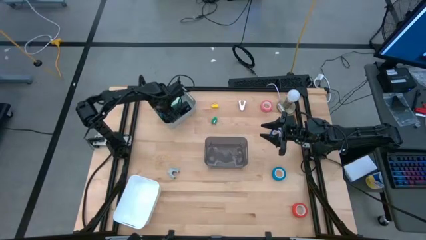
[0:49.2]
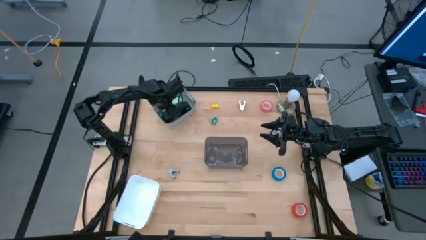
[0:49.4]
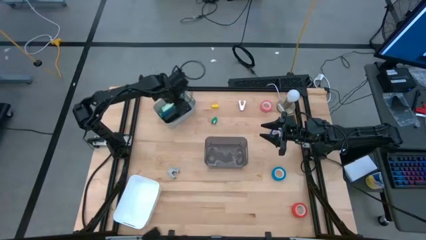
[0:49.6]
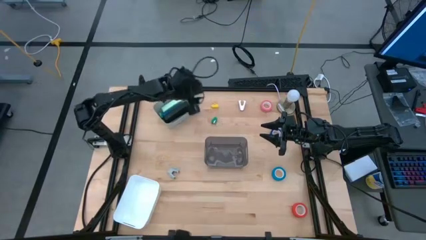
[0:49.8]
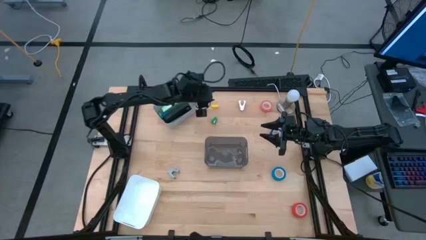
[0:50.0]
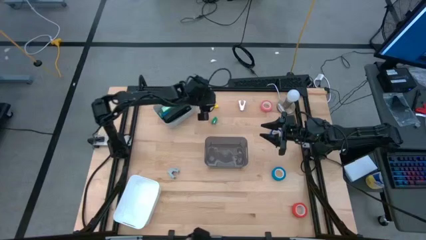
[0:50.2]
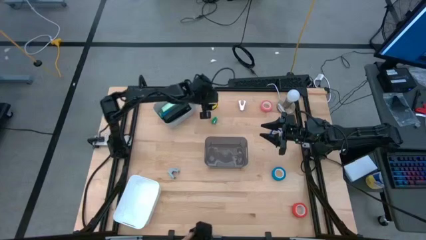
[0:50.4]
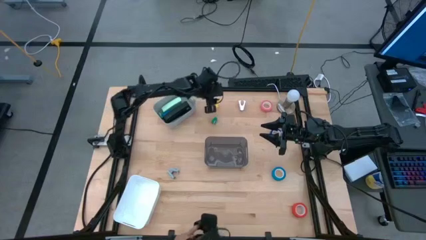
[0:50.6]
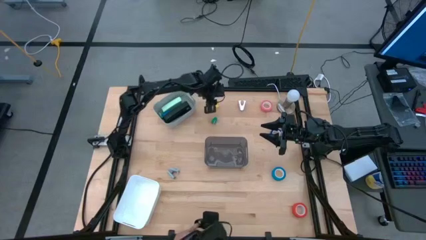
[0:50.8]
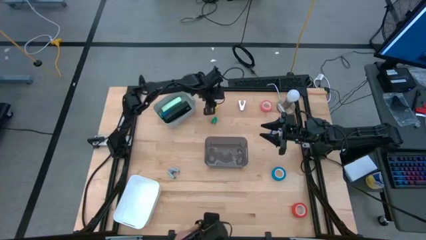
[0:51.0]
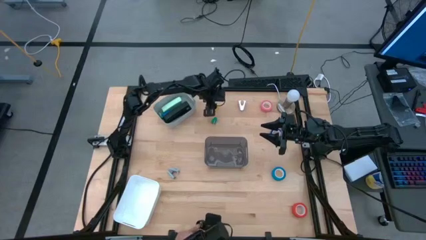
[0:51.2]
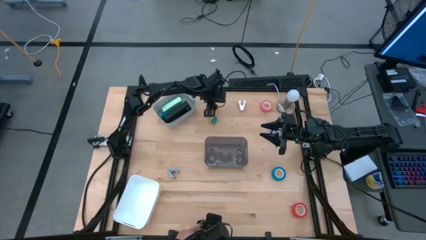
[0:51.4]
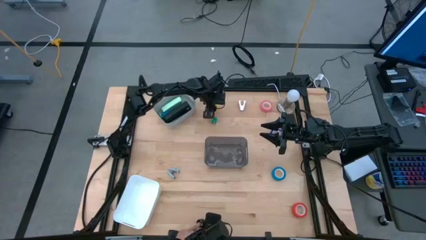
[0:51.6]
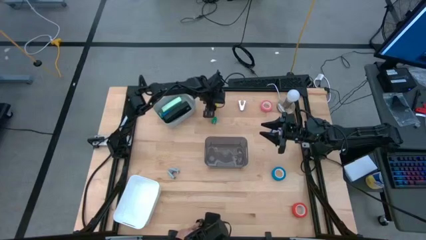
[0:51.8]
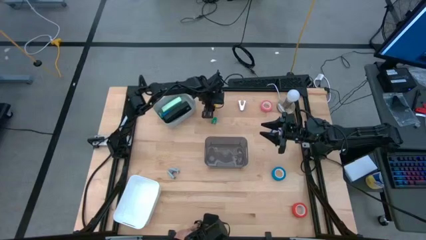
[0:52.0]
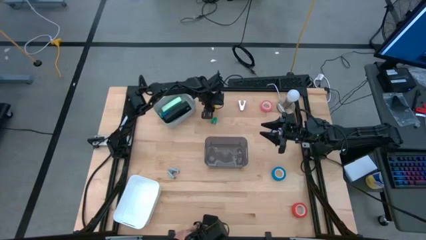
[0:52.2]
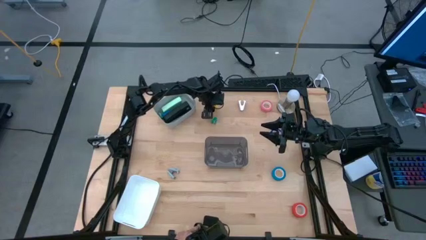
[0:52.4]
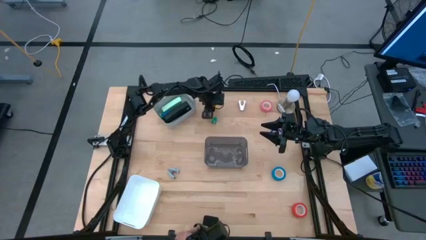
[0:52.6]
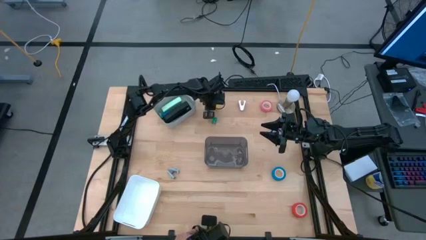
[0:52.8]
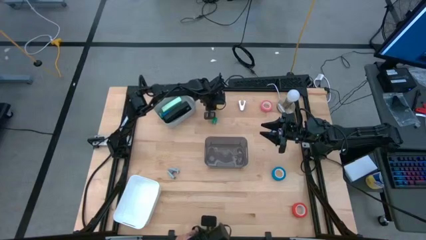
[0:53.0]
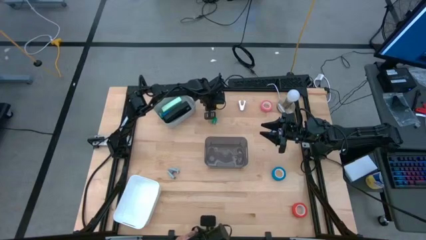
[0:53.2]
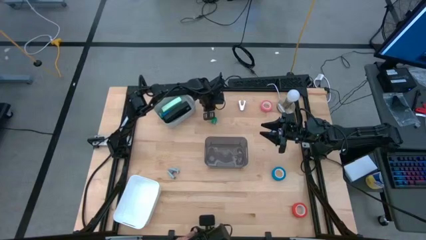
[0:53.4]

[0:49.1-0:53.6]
Task: Pick and place Stapler, Stapler remover, tape
Put the yellow stapler into the gray bin

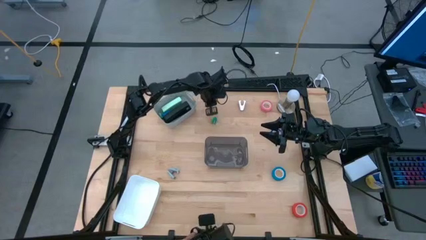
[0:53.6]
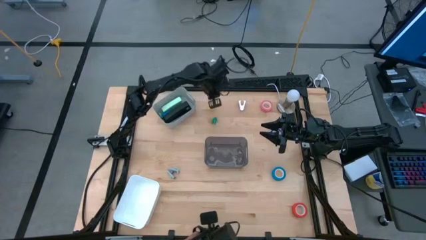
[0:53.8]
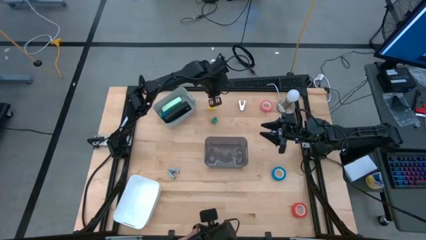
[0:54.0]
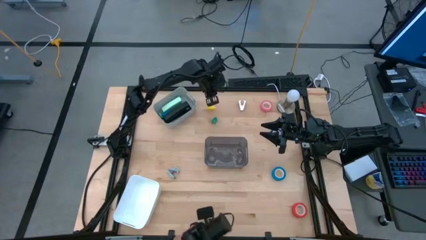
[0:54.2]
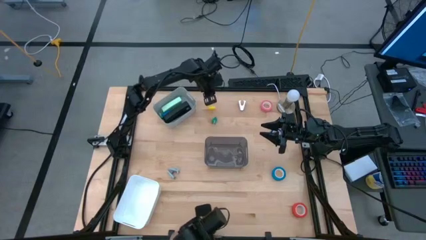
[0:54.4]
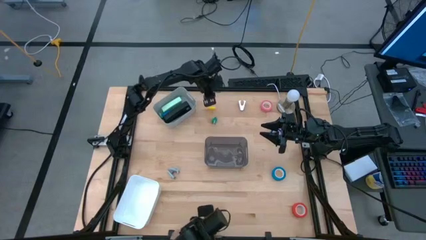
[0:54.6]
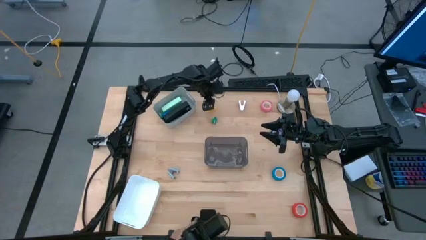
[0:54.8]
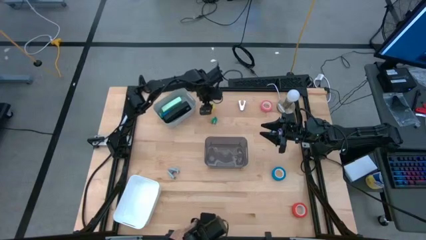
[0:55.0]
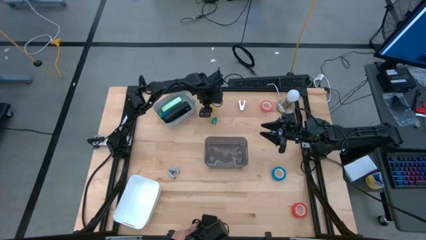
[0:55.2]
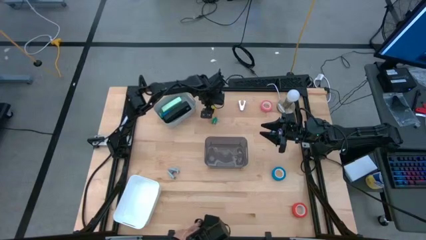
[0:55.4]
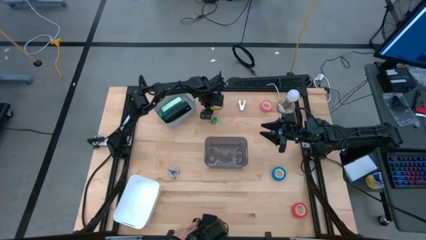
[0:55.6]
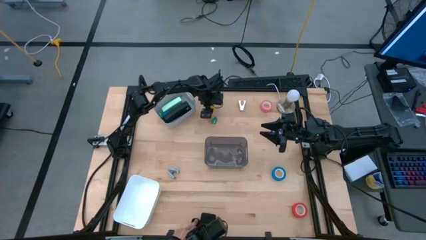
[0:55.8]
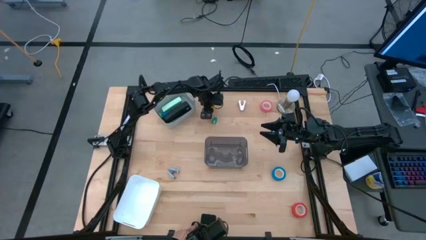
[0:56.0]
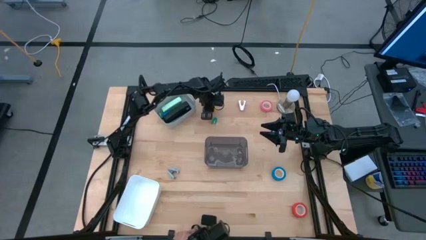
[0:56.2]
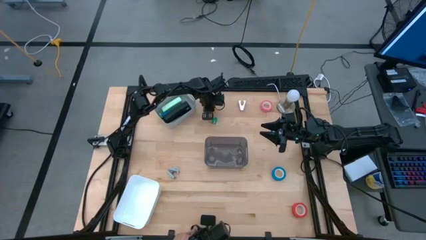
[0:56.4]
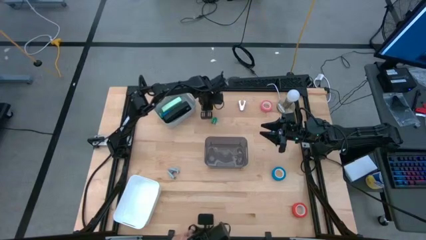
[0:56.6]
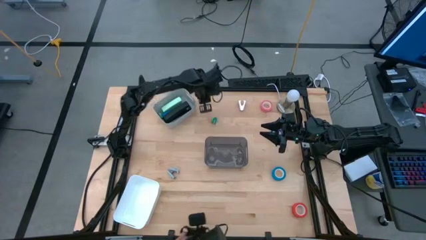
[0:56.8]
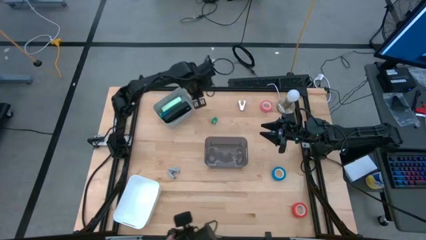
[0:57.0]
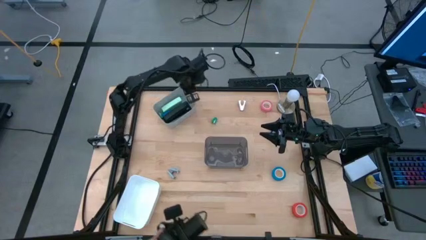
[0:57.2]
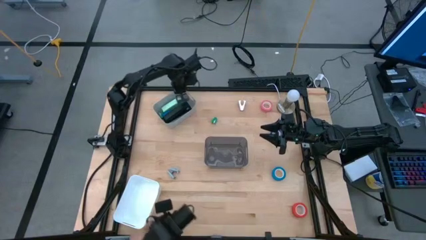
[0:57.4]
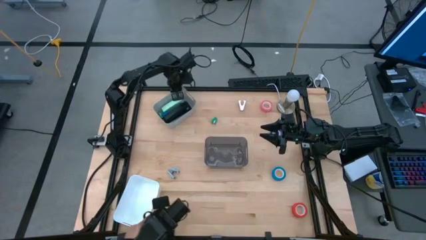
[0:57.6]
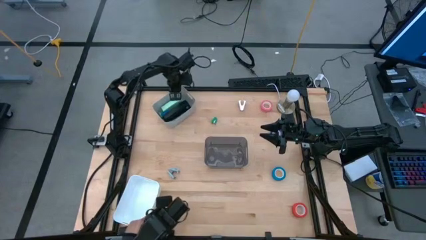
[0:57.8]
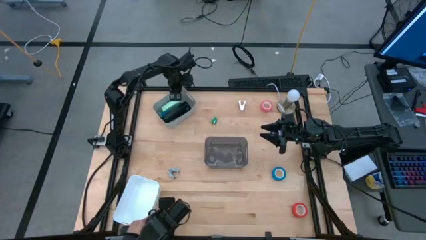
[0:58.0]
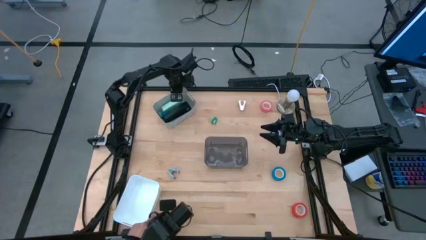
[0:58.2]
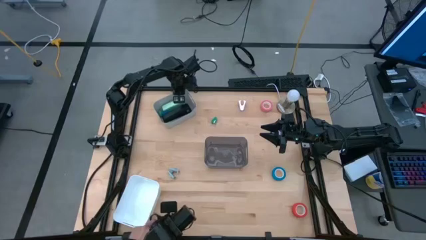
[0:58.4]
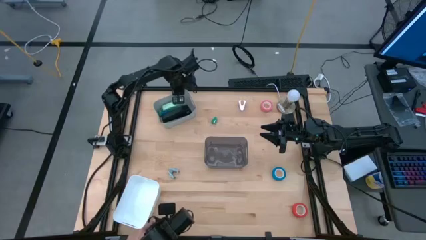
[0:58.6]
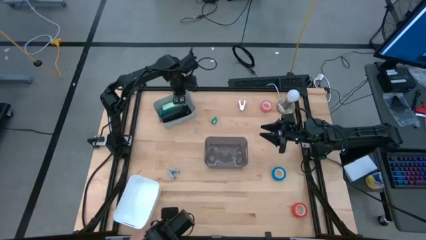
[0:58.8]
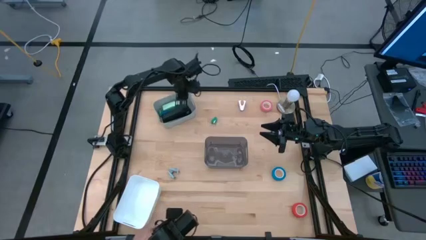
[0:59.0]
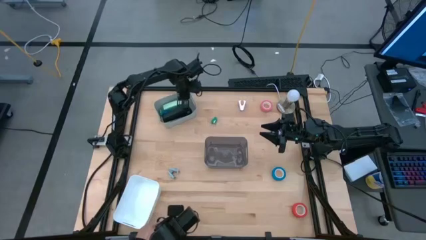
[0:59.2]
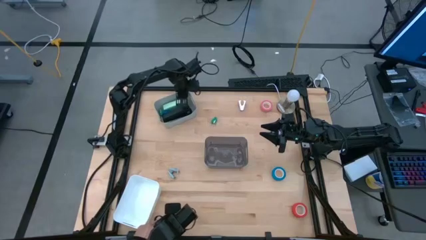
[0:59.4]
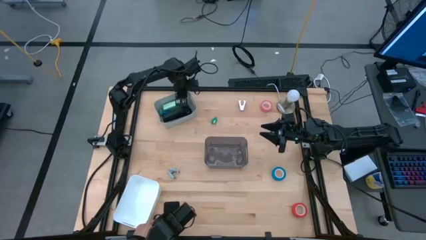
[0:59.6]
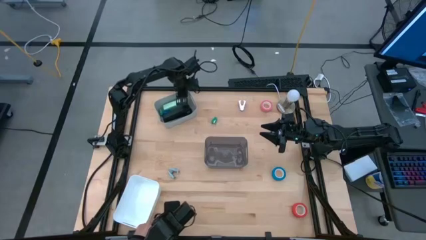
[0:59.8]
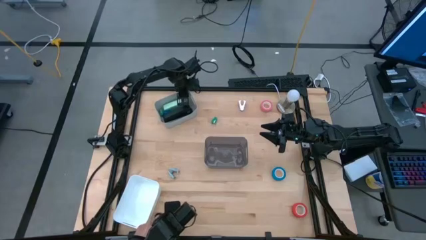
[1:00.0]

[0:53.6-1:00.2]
Put the yellow stapler into the gray bin

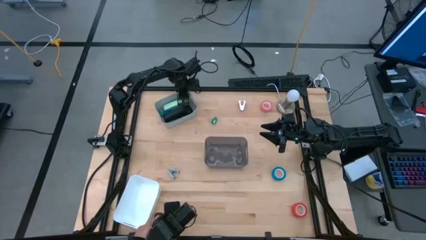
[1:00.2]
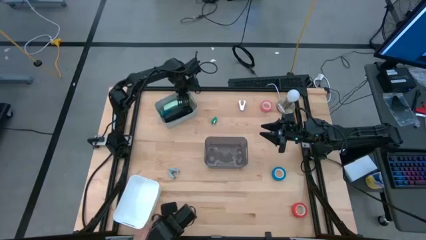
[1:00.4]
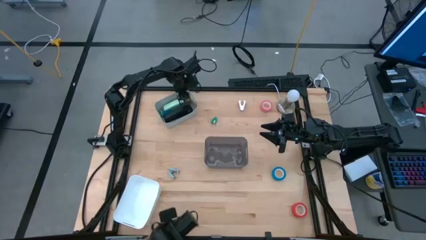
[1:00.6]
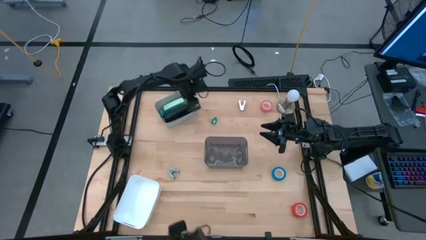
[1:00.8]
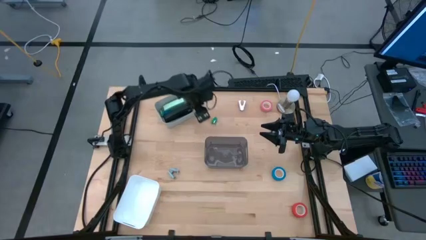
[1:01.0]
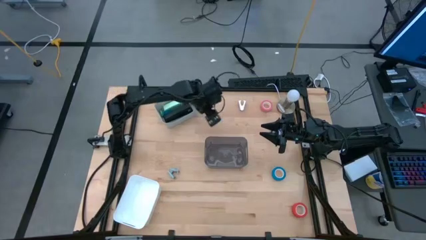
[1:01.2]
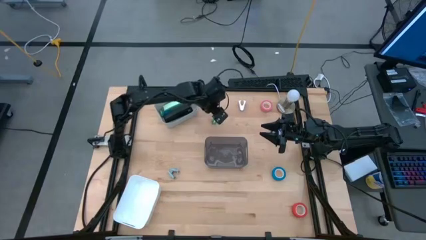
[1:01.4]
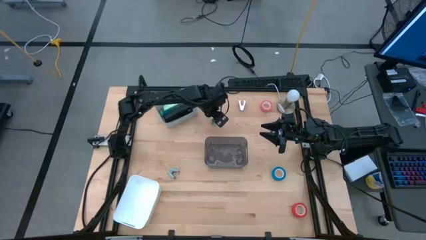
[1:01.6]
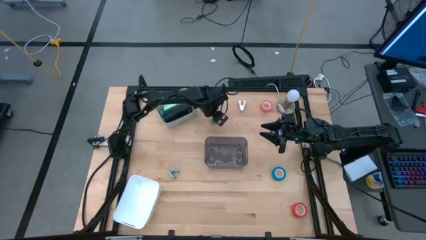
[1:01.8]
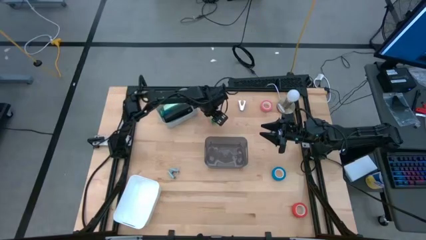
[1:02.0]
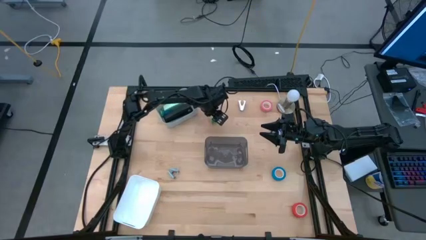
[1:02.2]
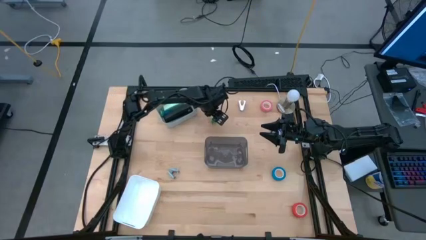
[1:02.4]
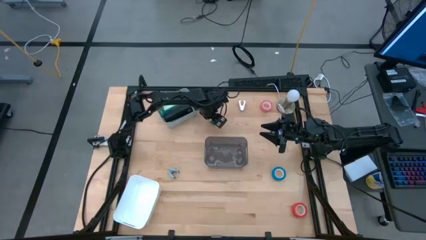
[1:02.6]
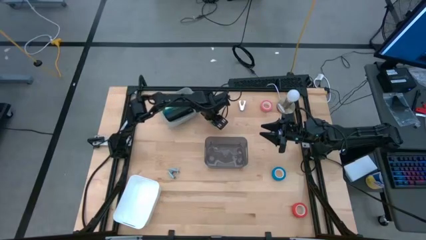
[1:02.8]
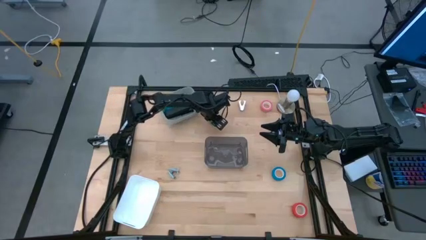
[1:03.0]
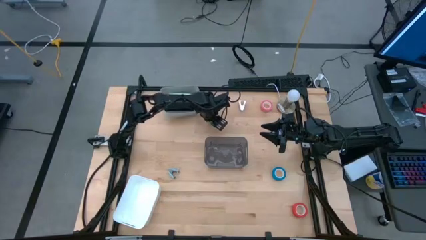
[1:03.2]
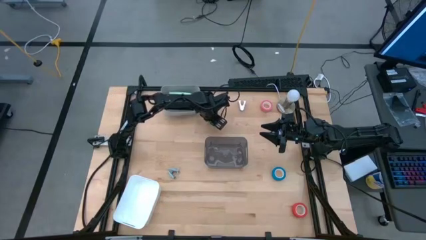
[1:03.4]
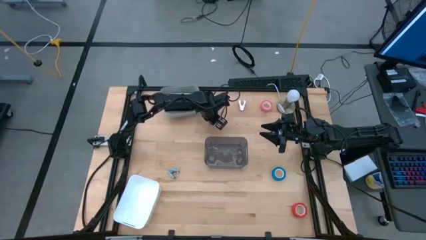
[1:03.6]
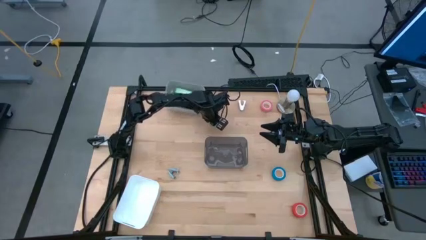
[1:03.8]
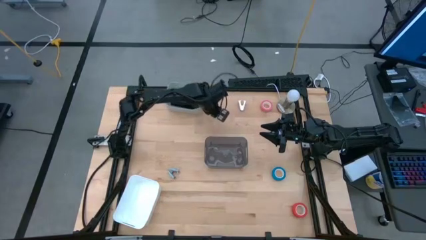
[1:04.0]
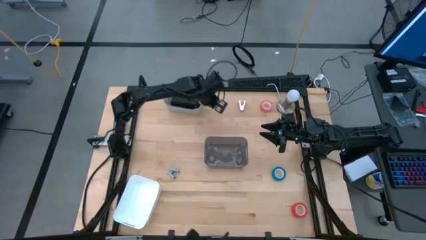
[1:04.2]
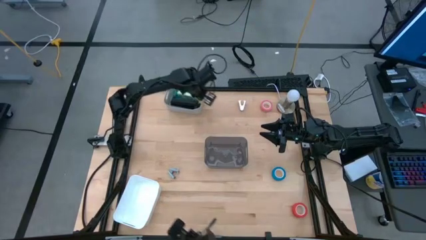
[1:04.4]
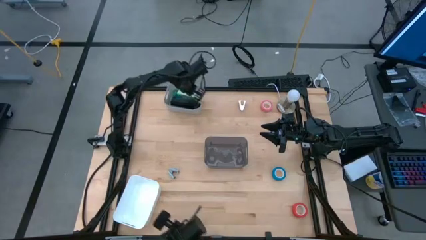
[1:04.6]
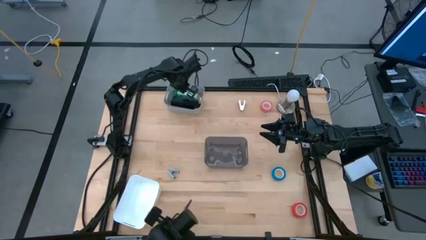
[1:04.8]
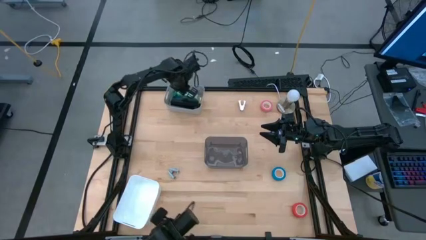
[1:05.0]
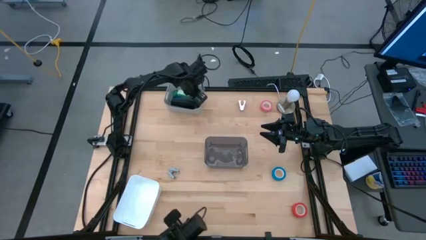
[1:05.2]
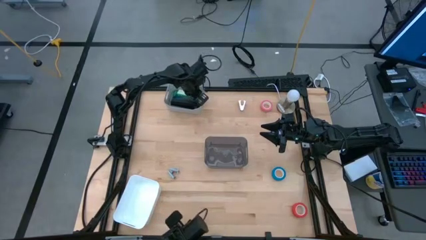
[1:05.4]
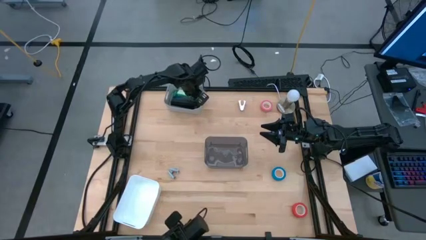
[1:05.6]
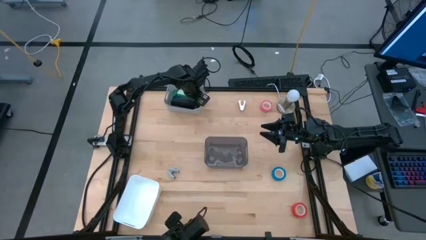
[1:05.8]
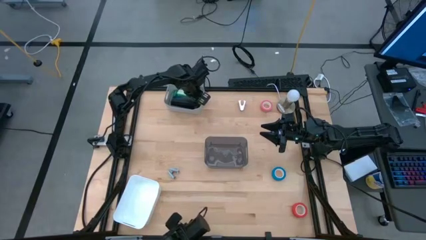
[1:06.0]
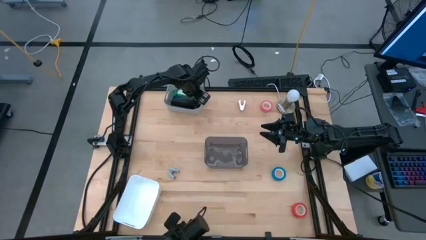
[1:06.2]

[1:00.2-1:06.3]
Put the green stapler into the gray bin

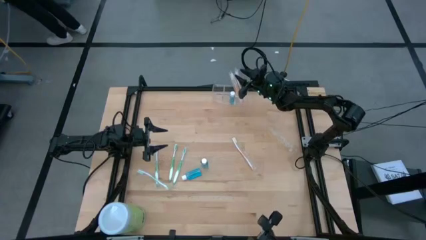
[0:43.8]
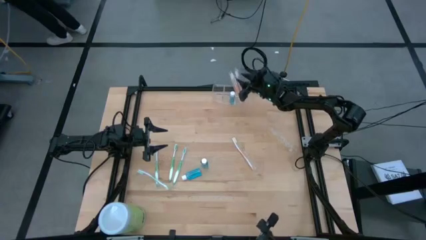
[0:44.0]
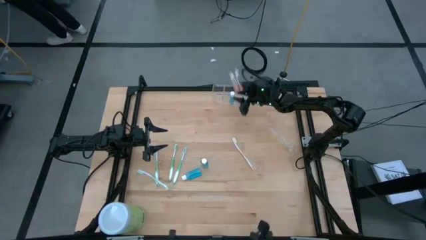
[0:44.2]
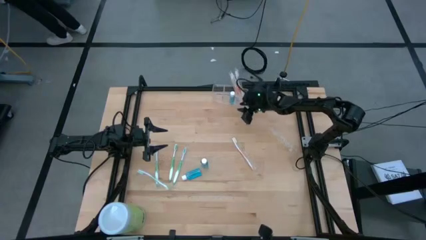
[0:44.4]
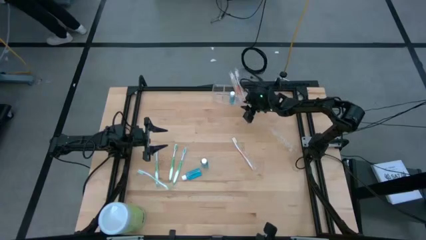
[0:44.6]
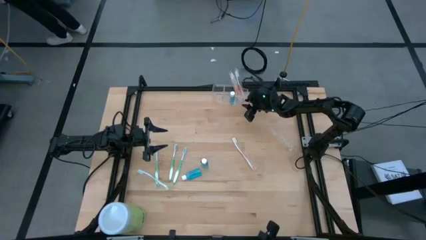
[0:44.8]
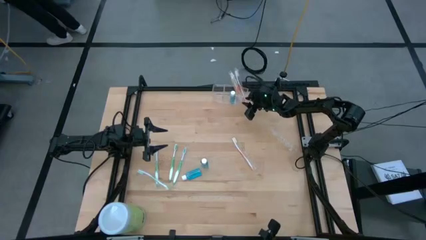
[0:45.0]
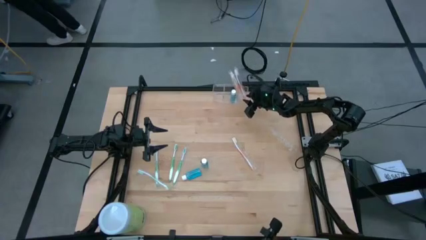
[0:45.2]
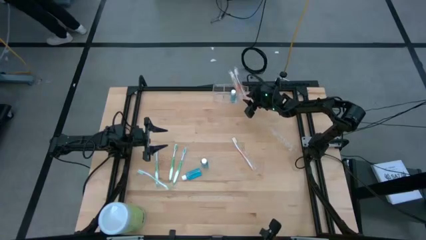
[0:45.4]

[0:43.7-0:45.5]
Task: Pick & Place toothbrushing station
Adjust the transparent organizer
